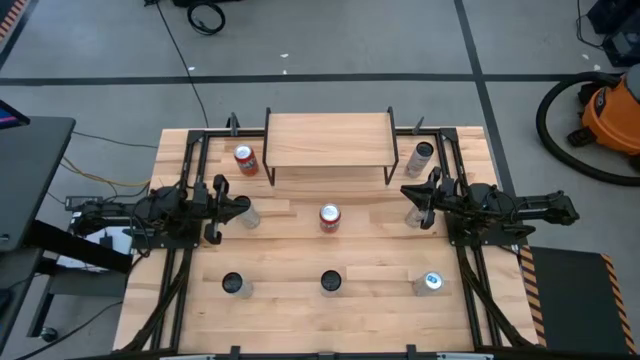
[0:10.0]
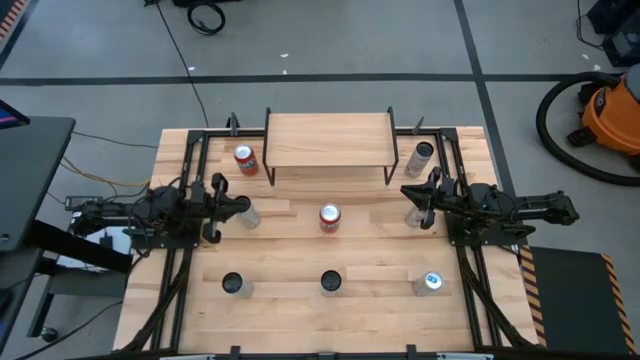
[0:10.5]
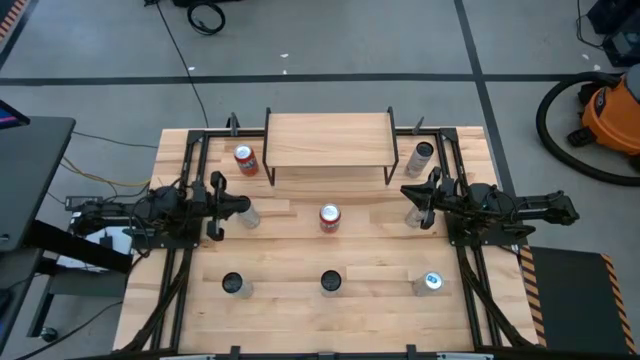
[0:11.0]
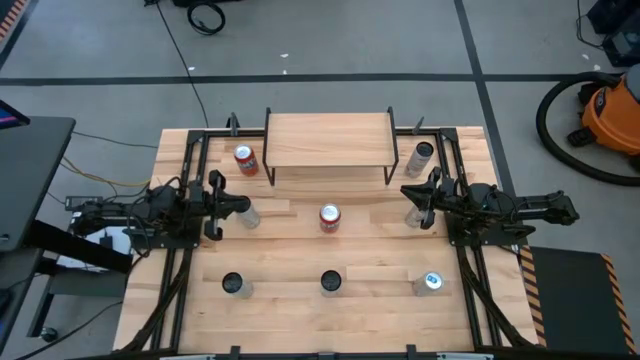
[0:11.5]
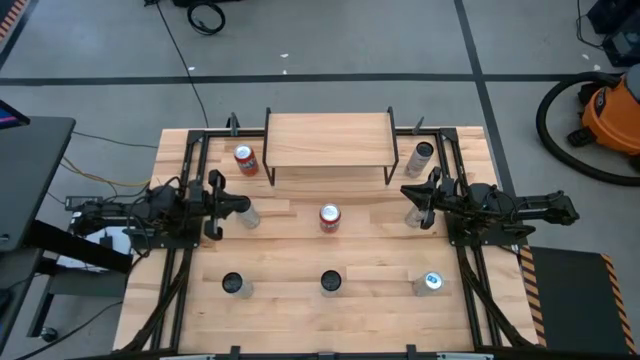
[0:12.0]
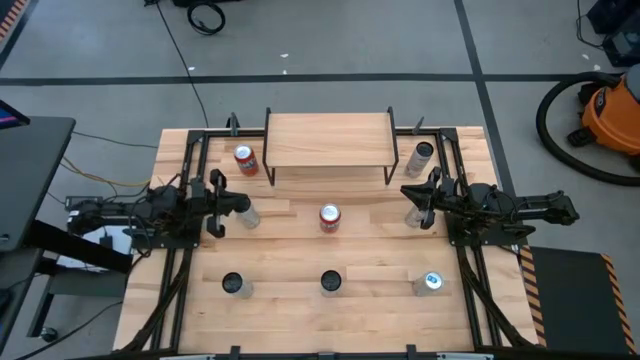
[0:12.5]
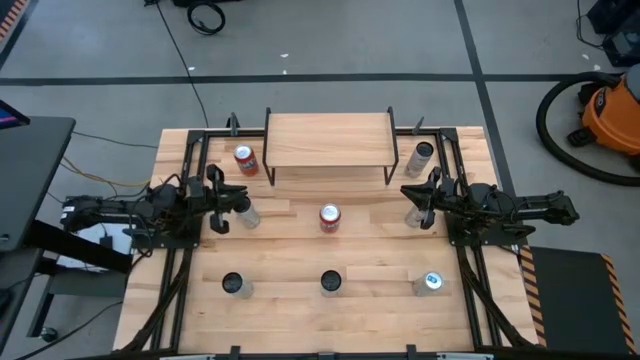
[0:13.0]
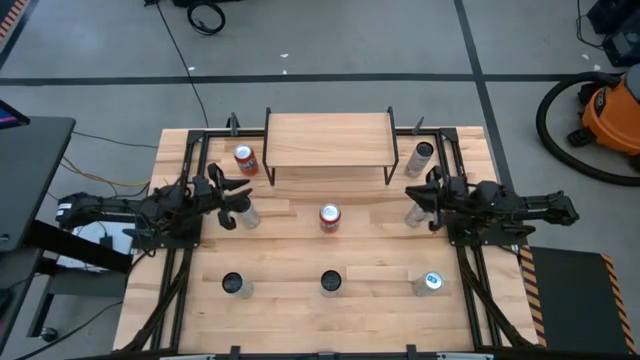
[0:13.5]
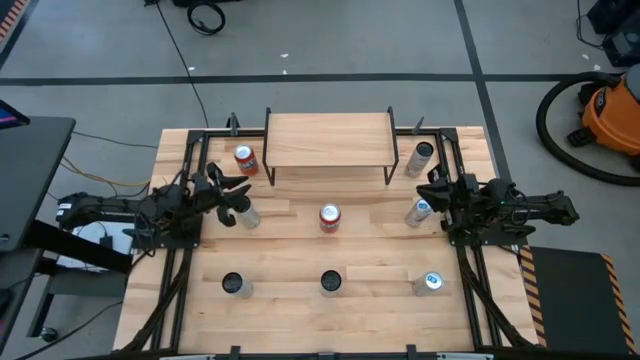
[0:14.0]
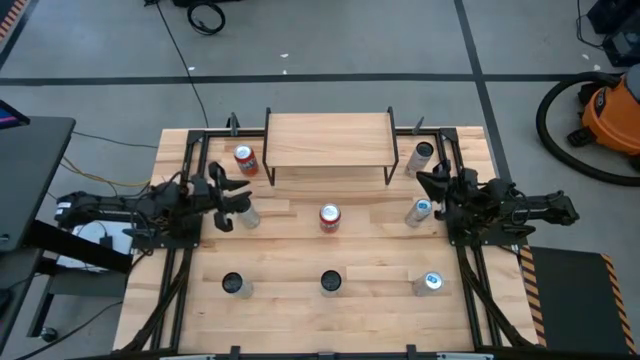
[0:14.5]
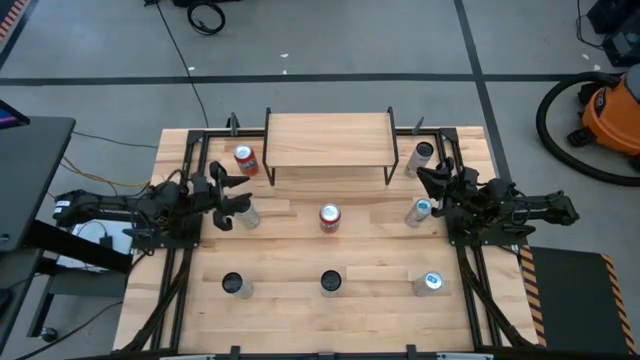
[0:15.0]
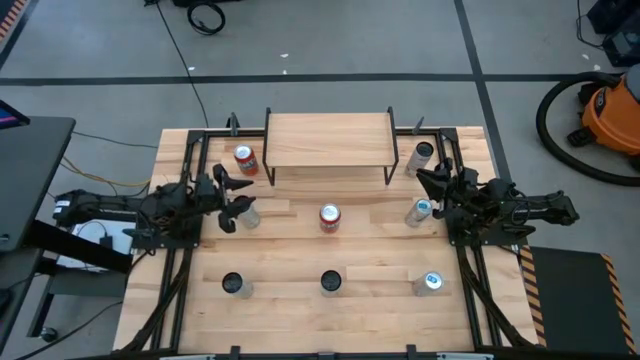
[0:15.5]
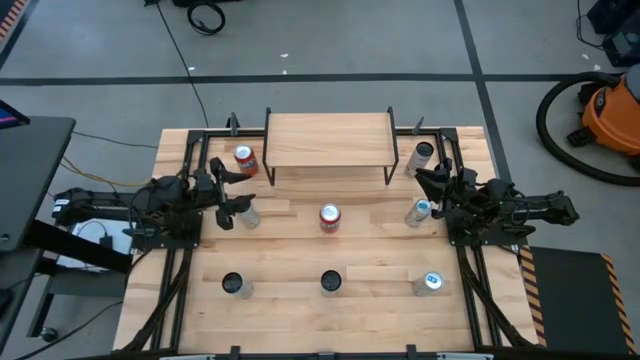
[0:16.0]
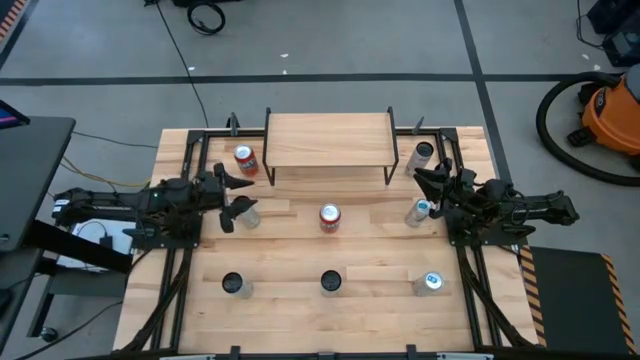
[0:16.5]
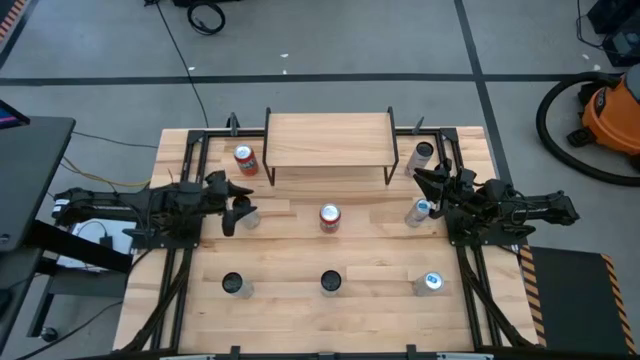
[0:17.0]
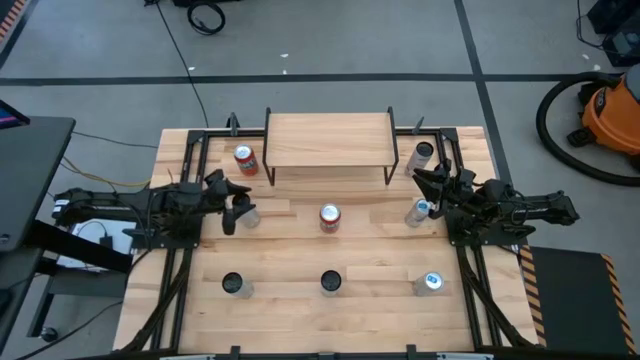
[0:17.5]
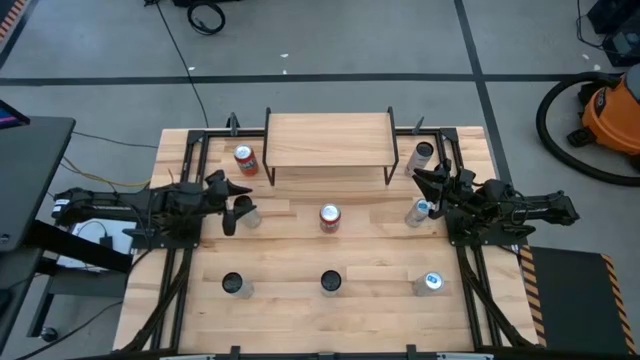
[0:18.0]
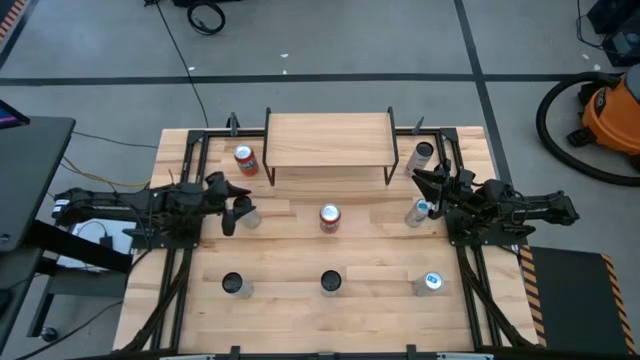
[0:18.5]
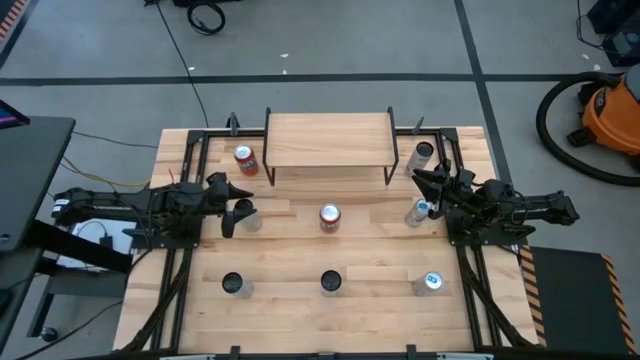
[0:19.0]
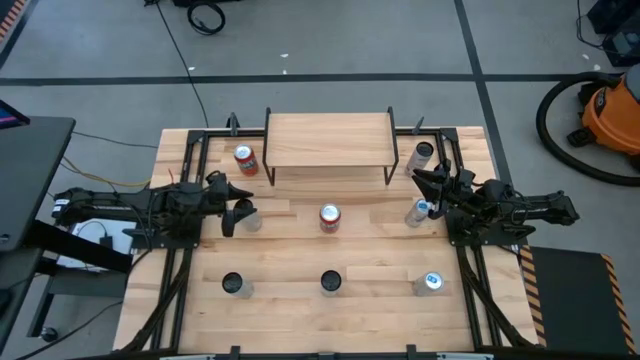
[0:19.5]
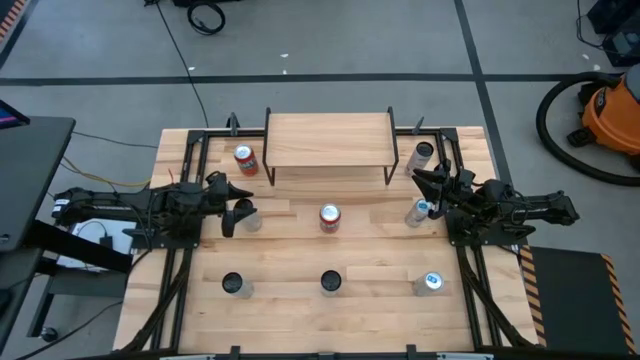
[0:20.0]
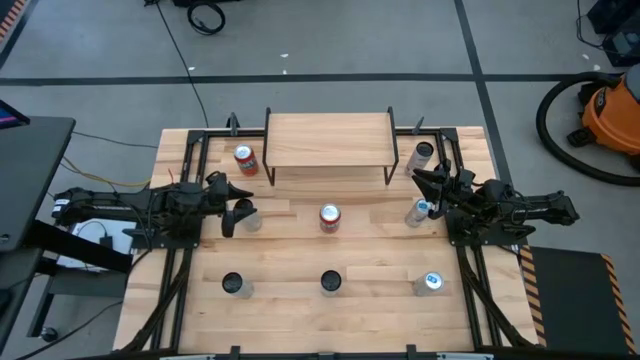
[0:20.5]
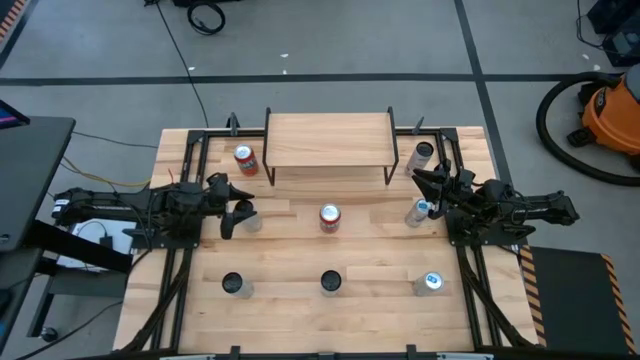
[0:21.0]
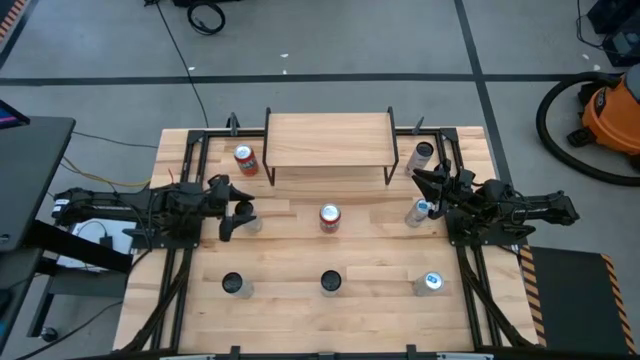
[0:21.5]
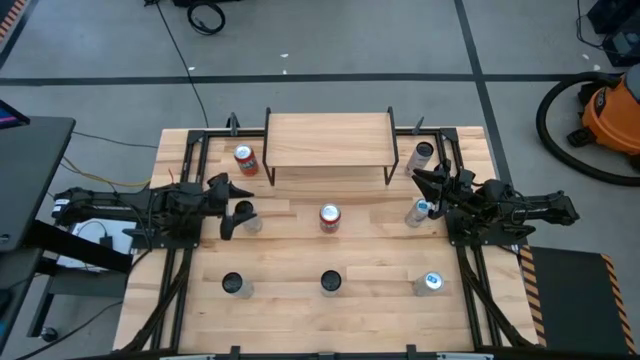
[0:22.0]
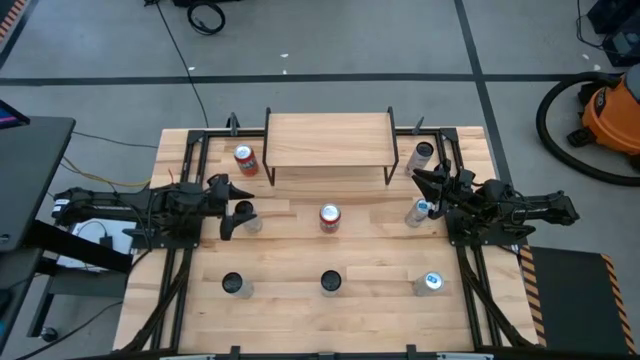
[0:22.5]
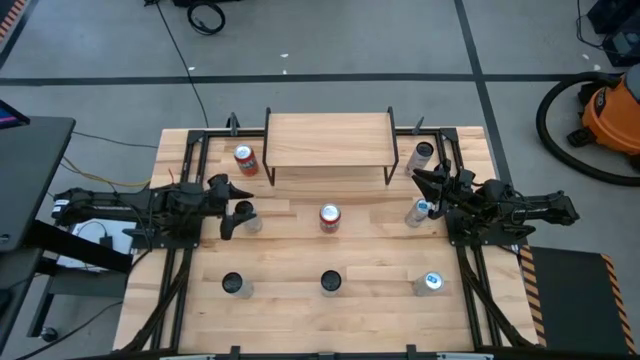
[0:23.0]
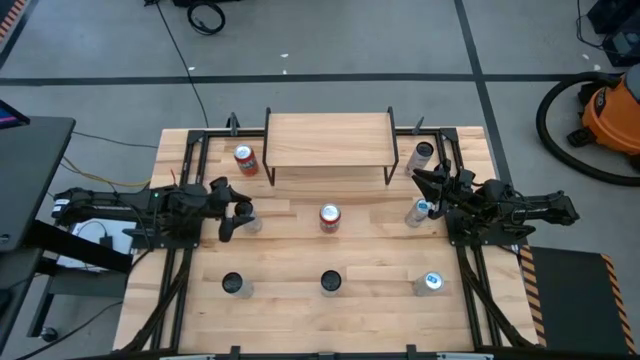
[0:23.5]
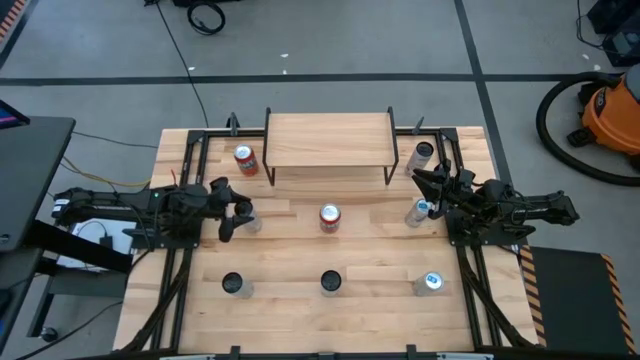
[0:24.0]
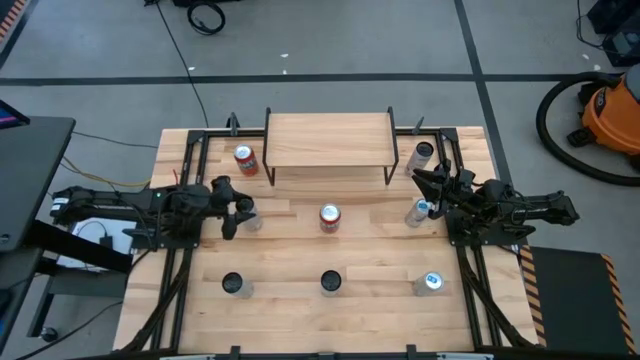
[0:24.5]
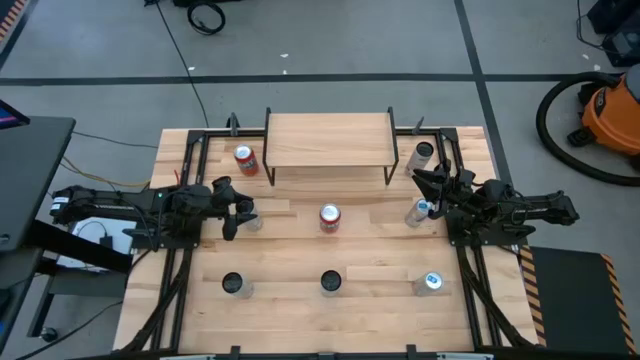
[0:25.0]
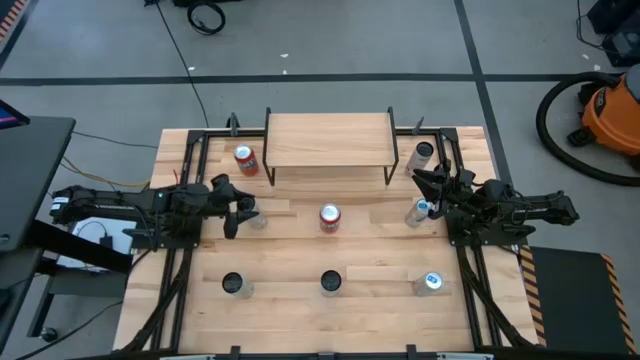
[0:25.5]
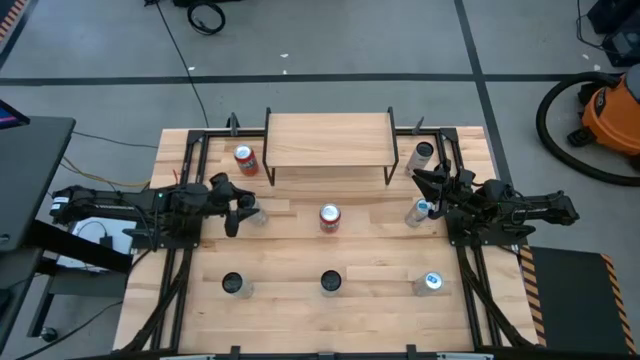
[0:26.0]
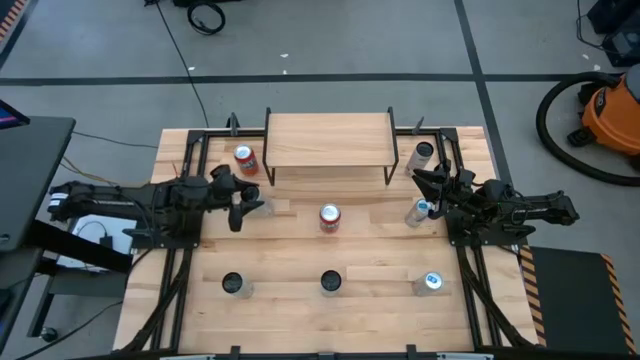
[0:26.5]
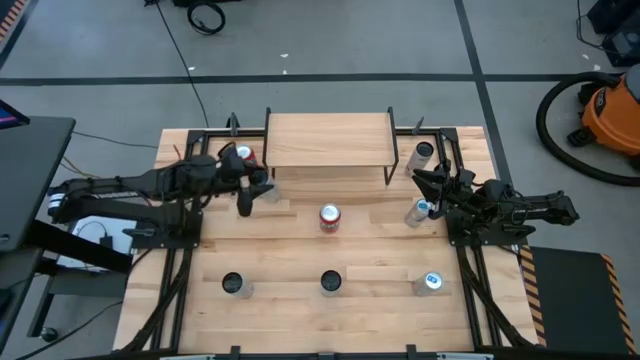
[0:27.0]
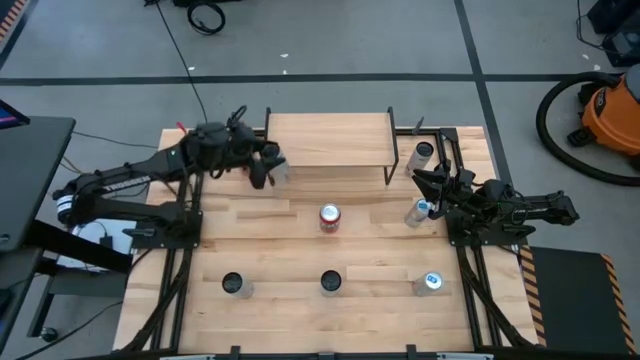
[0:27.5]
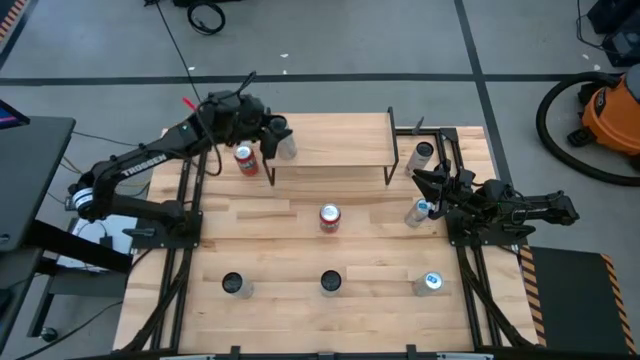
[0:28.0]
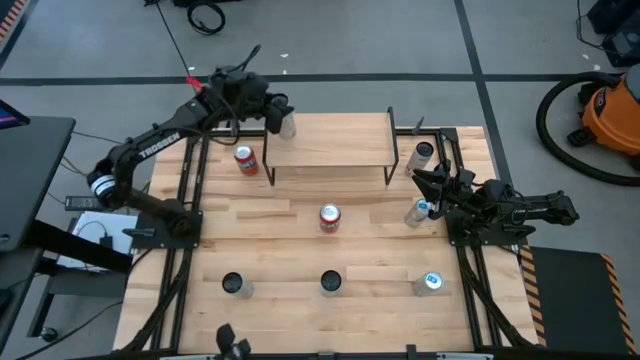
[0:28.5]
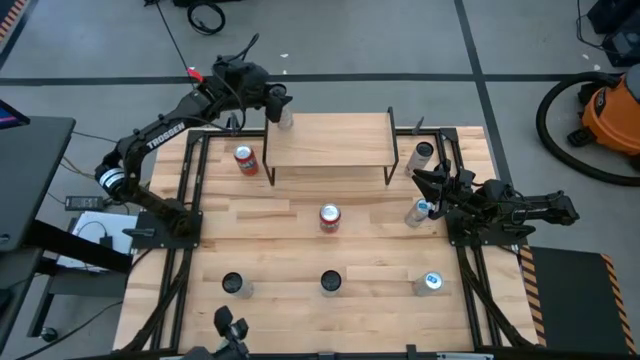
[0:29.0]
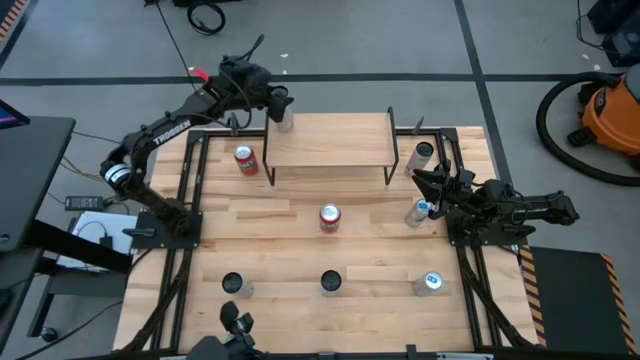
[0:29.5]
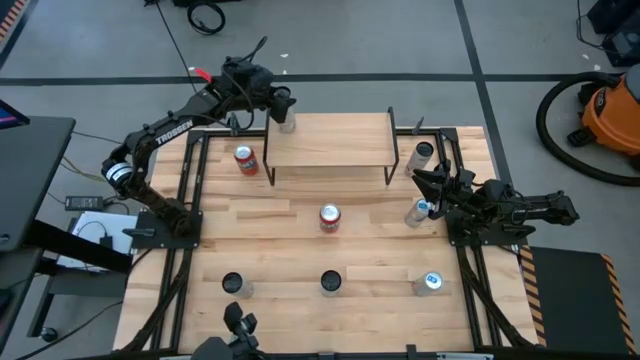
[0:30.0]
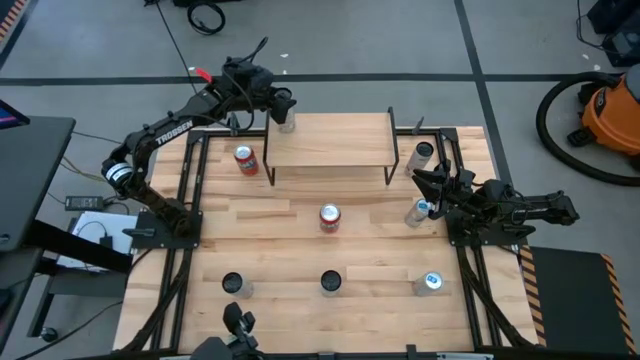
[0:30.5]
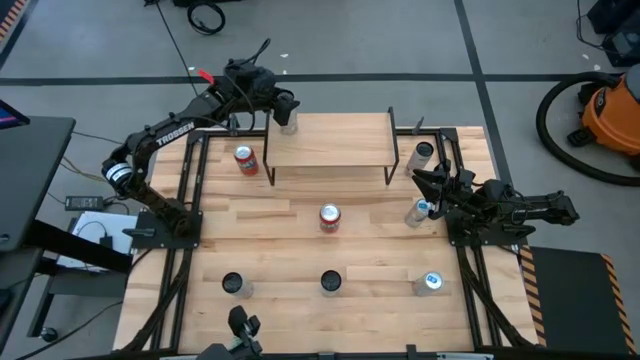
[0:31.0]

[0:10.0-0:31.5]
Task: Place canned beverage on shelf
Put the top white yellow soda can on the shelf

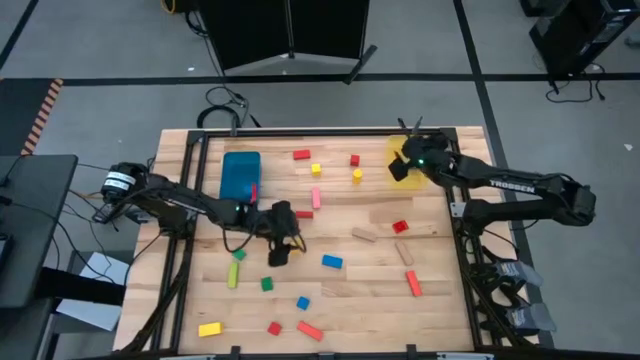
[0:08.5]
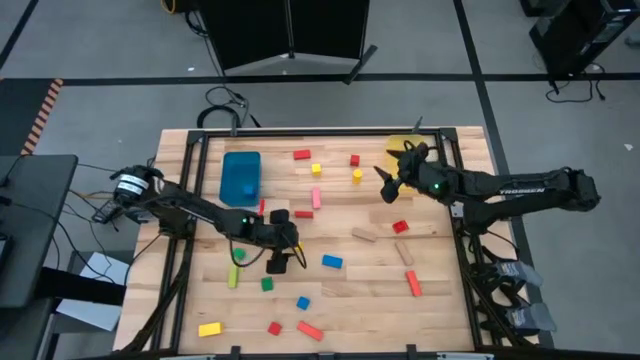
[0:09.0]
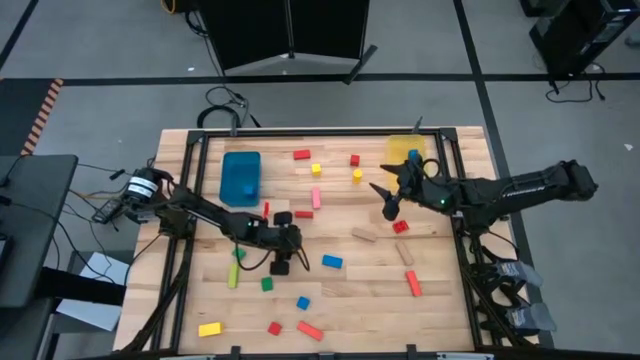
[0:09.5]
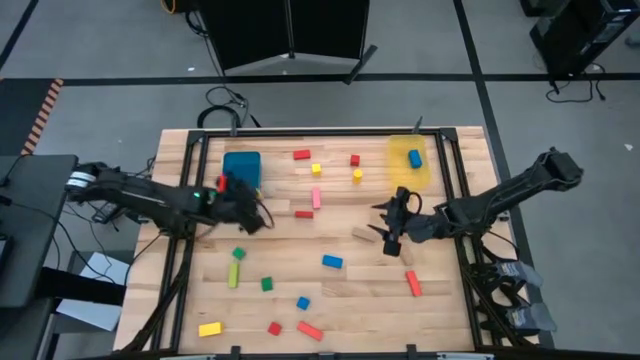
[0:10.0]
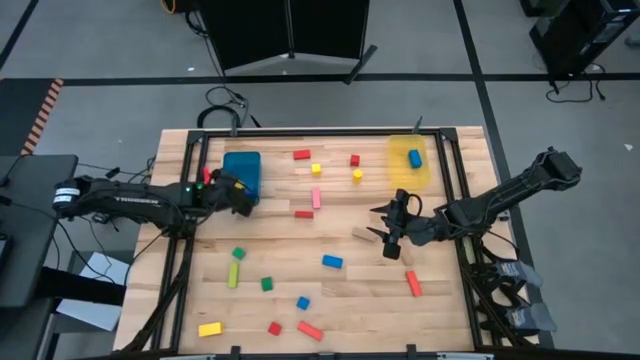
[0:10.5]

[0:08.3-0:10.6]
Task: Sort blocks by size
Put the small yellow block into the blue bin
